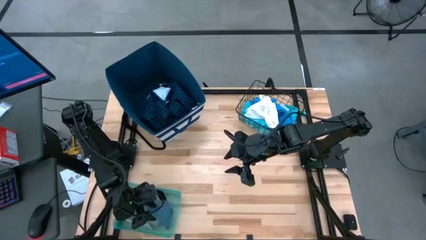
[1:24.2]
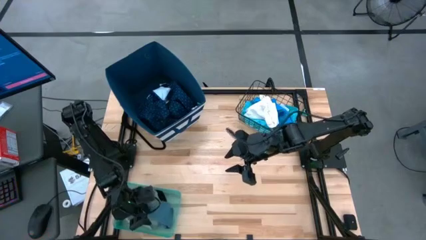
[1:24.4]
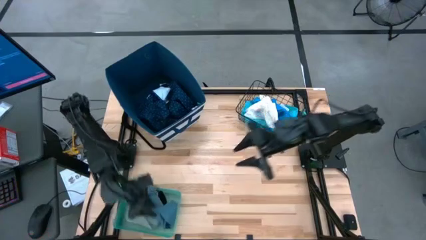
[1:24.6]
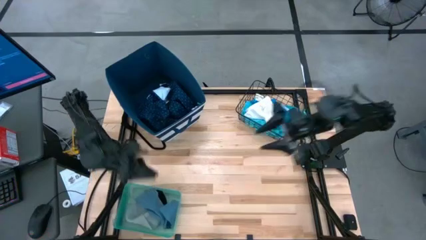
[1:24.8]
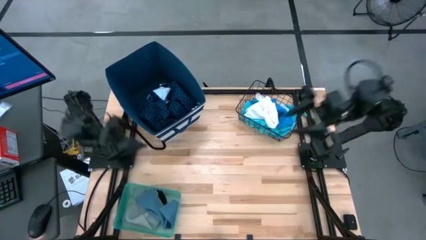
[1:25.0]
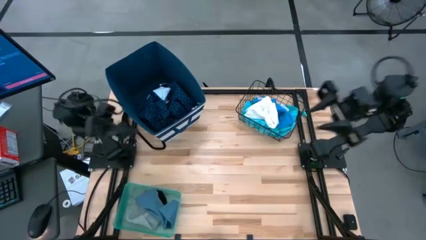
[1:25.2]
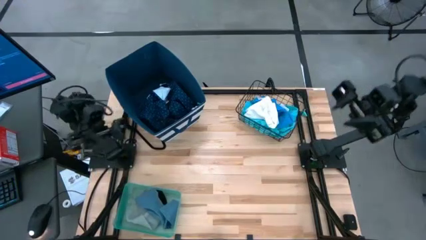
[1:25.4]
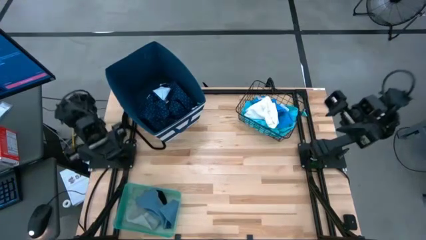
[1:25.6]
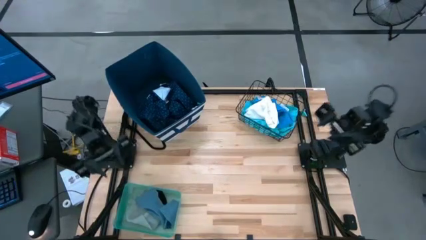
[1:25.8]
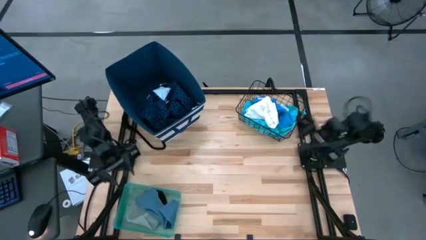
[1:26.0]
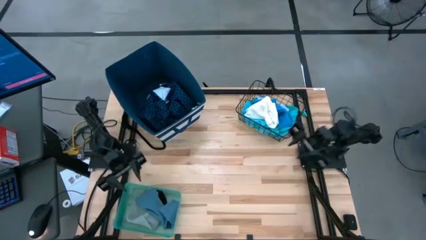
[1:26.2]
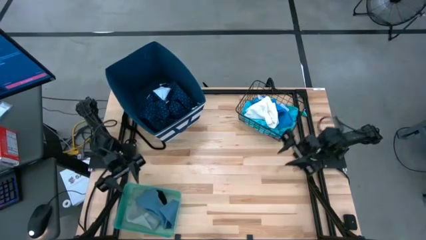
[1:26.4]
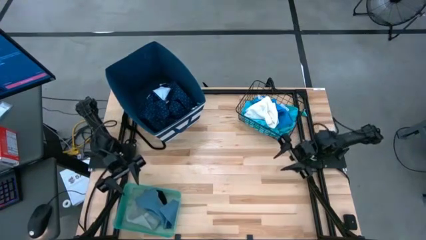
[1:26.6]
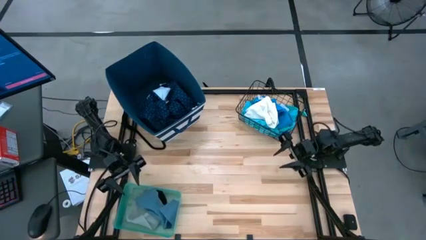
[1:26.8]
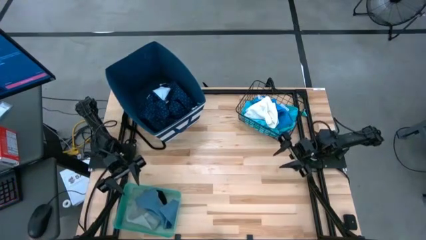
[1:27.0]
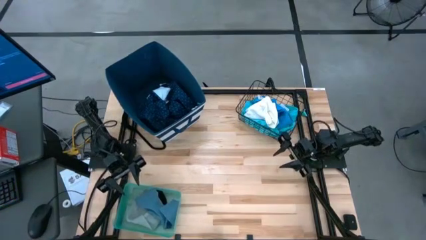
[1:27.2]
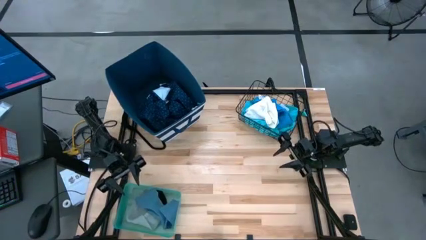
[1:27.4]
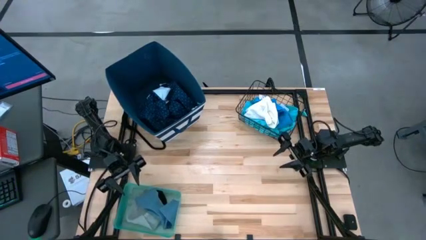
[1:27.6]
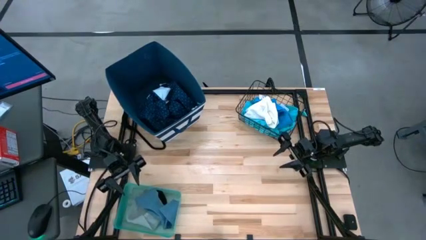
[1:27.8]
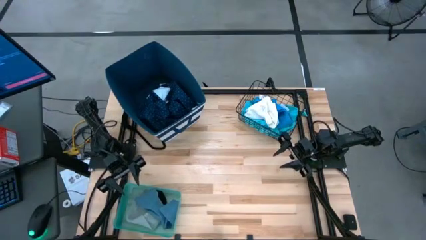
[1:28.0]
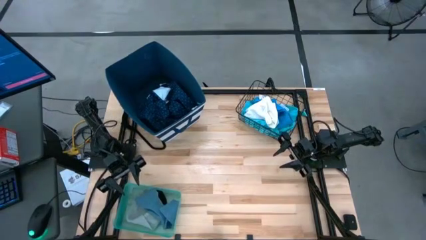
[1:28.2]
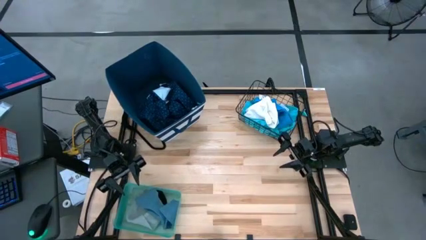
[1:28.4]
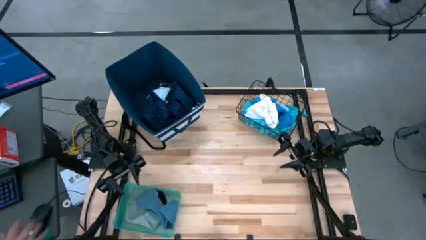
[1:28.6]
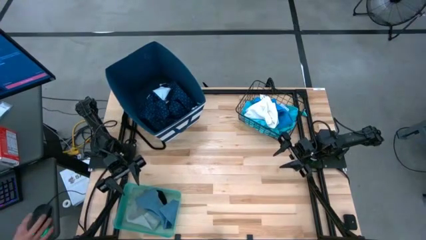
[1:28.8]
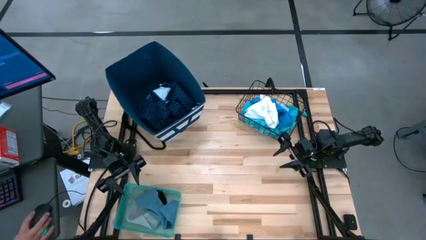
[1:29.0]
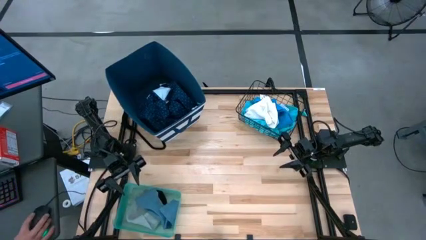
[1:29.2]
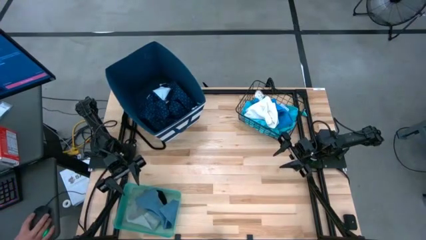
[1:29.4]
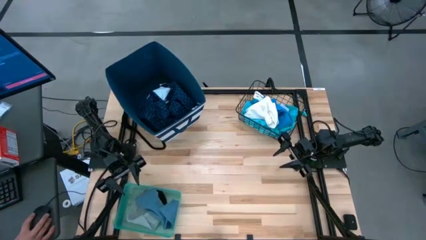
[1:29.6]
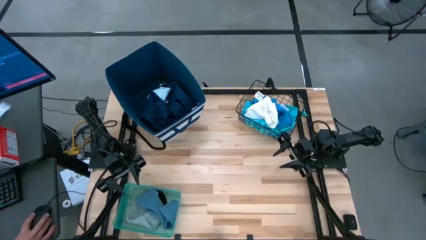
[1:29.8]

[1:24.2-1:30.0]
Task: Pick & Place Cloths
Return to Home Position

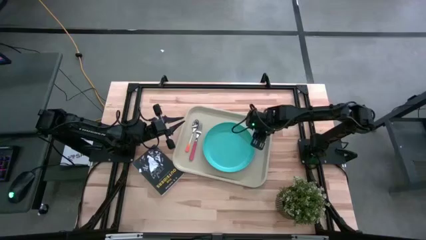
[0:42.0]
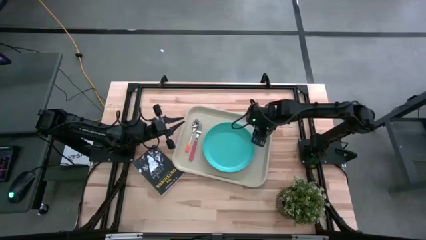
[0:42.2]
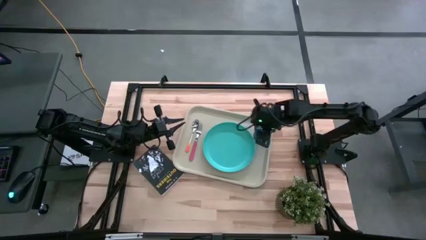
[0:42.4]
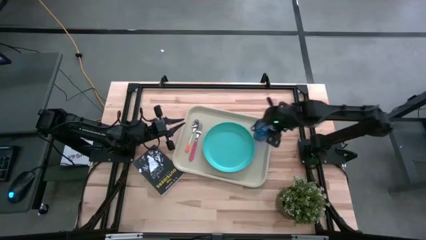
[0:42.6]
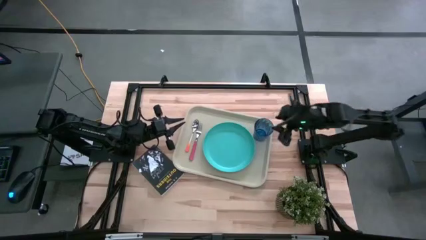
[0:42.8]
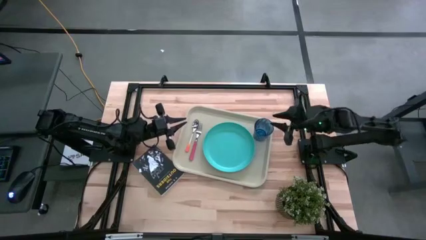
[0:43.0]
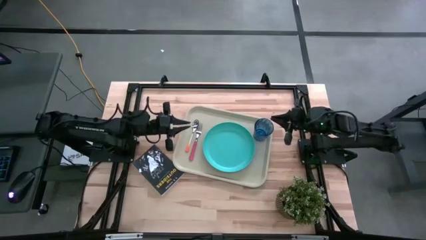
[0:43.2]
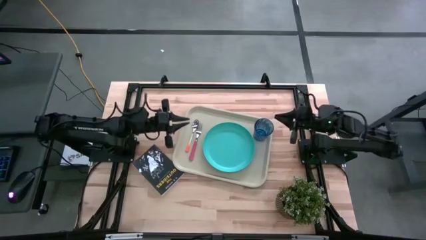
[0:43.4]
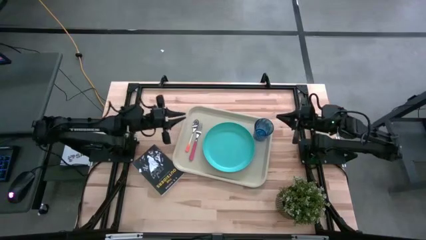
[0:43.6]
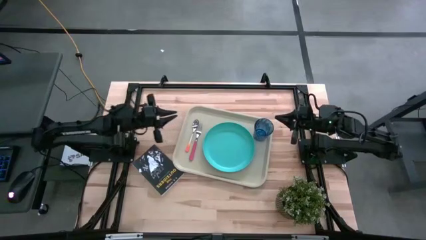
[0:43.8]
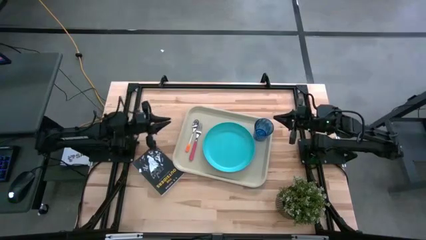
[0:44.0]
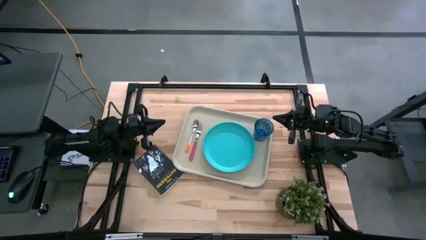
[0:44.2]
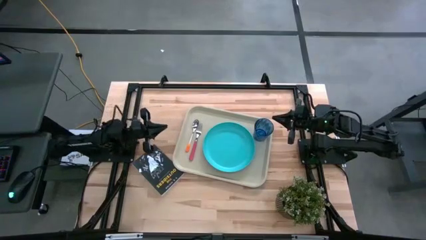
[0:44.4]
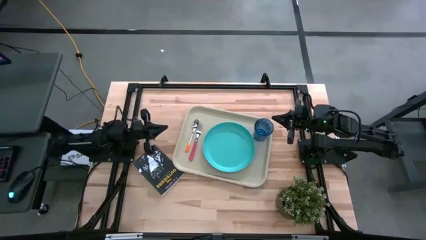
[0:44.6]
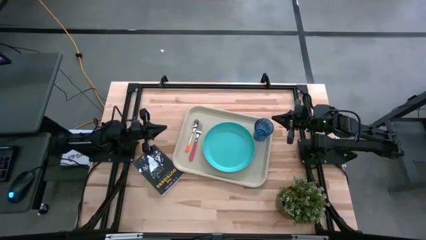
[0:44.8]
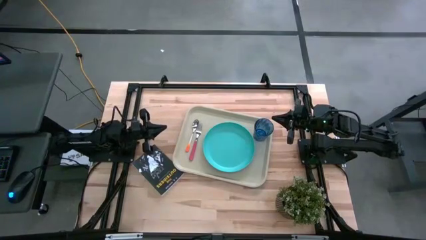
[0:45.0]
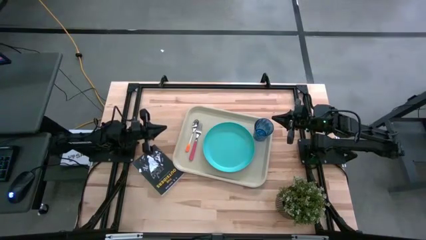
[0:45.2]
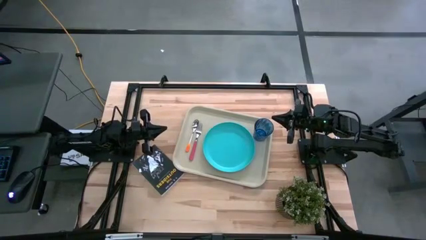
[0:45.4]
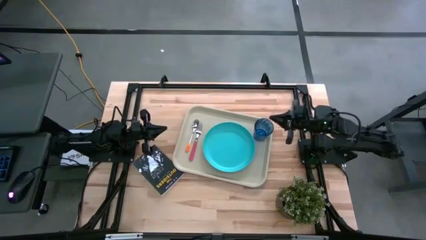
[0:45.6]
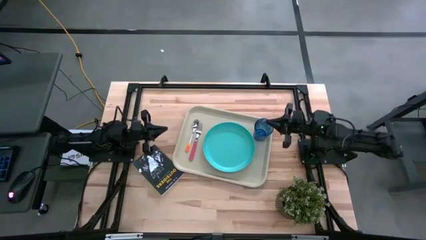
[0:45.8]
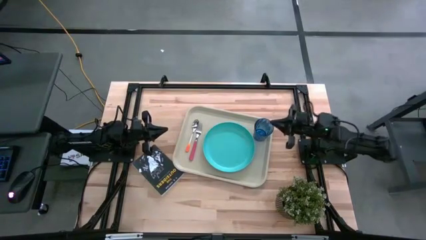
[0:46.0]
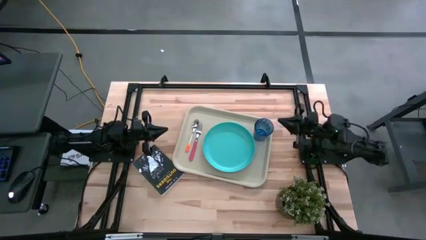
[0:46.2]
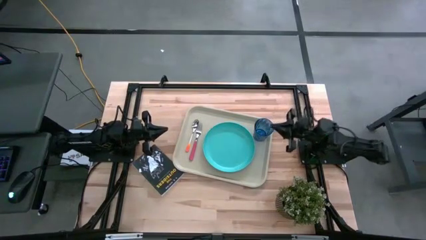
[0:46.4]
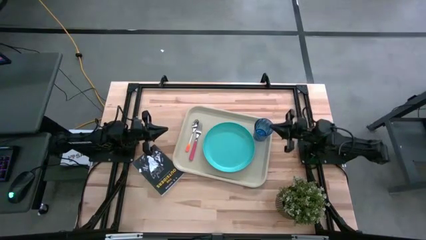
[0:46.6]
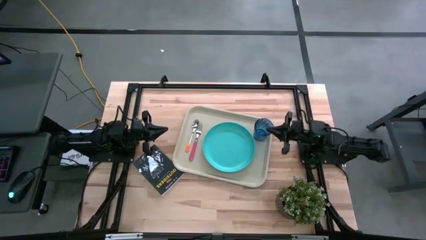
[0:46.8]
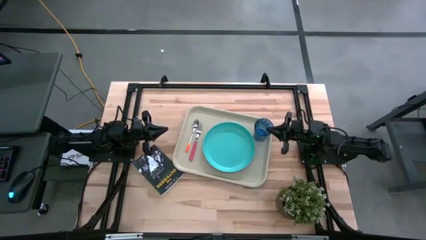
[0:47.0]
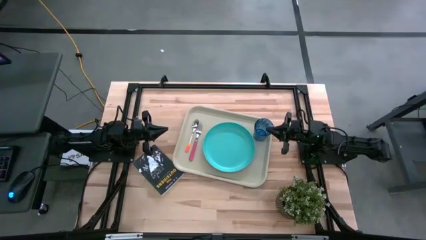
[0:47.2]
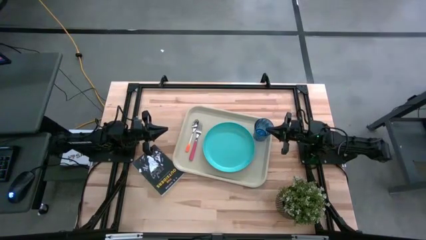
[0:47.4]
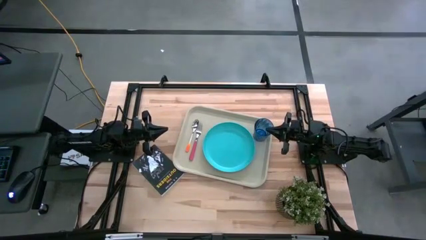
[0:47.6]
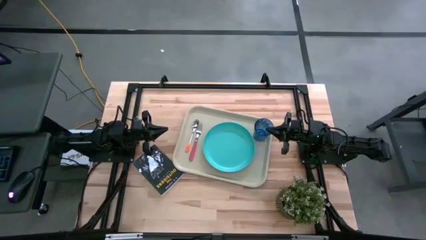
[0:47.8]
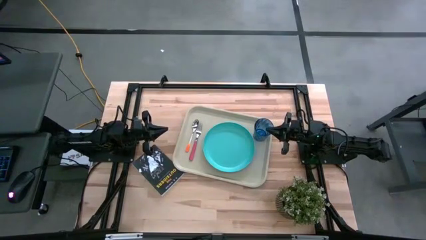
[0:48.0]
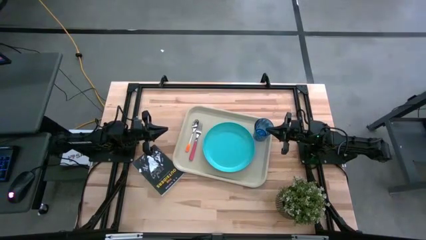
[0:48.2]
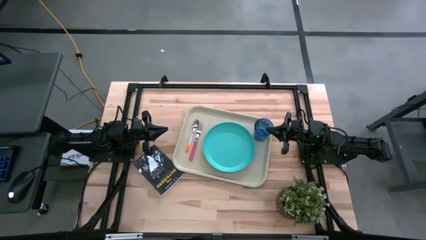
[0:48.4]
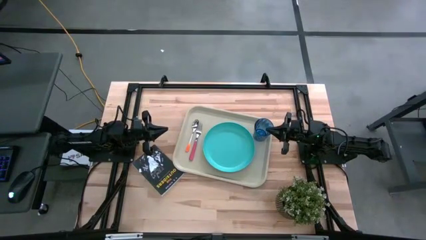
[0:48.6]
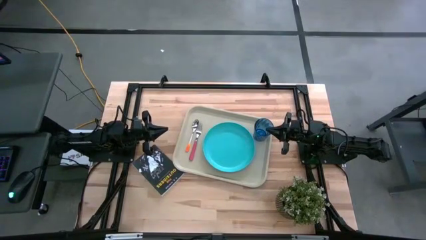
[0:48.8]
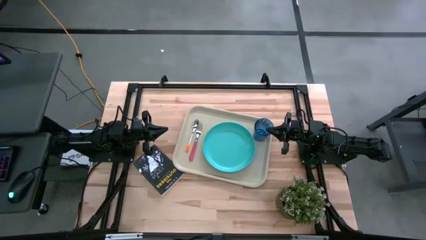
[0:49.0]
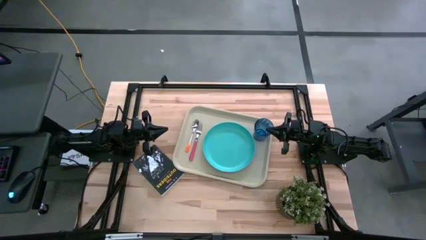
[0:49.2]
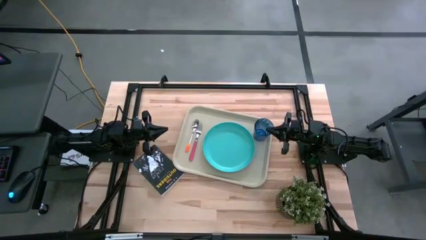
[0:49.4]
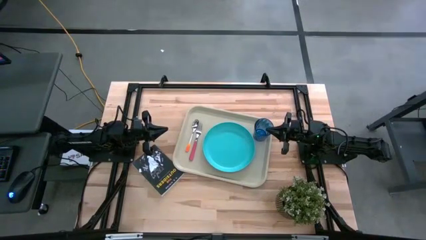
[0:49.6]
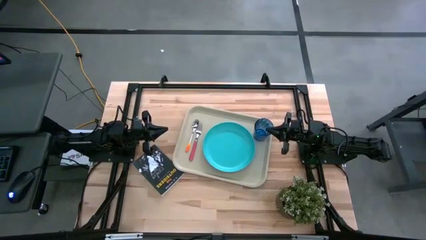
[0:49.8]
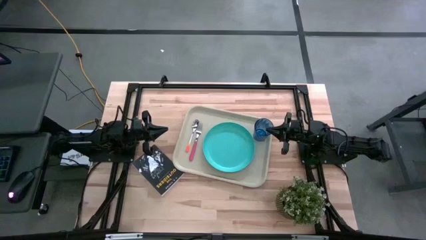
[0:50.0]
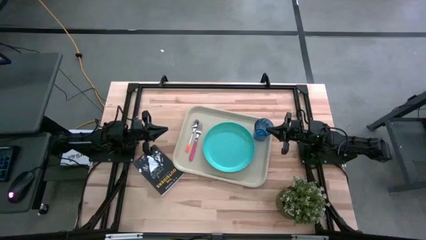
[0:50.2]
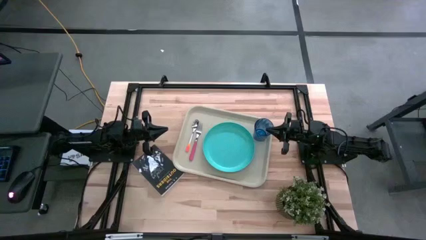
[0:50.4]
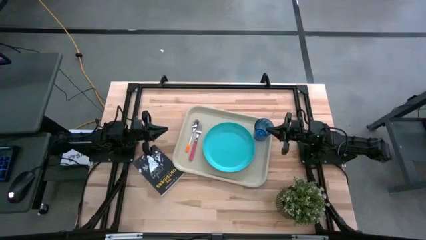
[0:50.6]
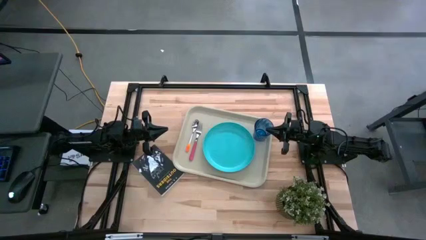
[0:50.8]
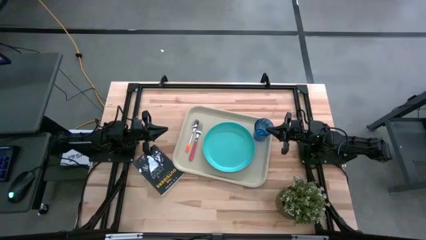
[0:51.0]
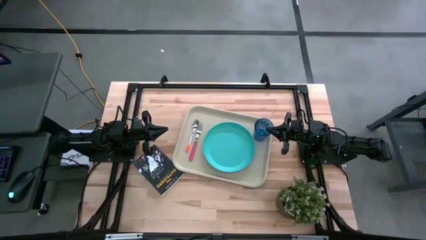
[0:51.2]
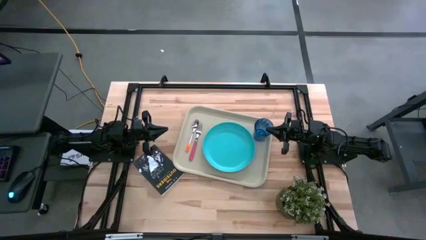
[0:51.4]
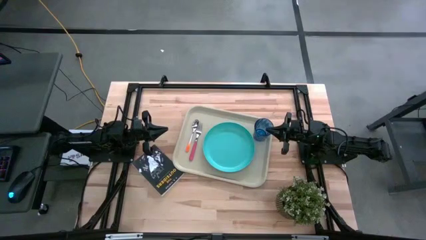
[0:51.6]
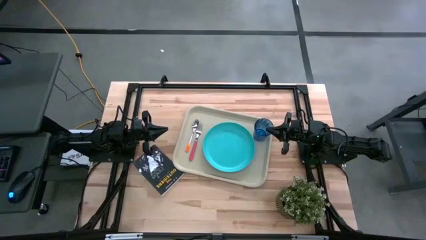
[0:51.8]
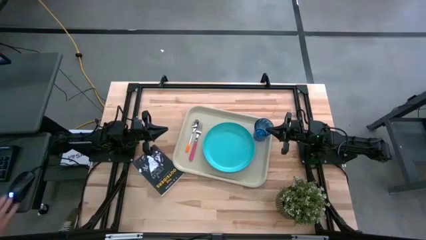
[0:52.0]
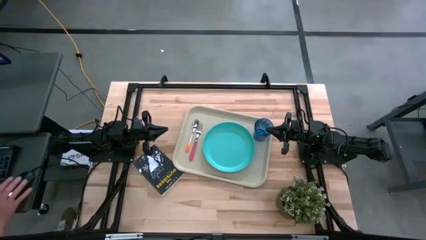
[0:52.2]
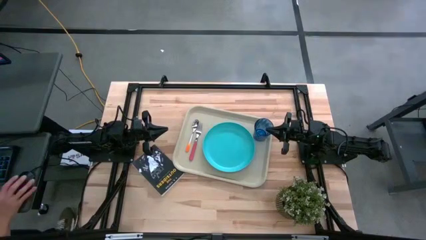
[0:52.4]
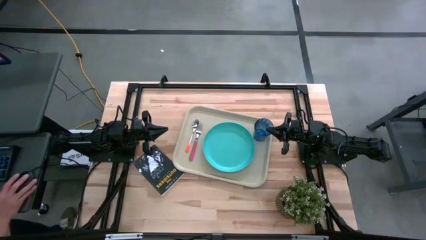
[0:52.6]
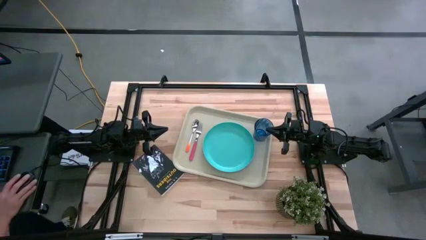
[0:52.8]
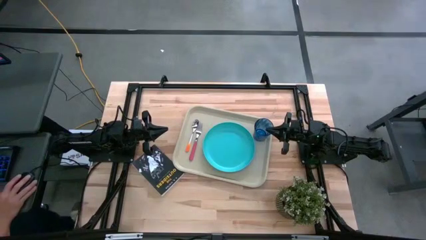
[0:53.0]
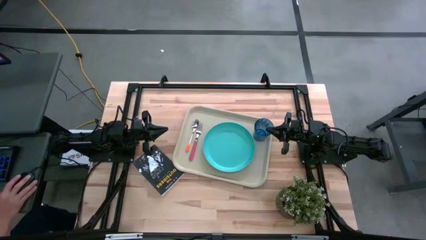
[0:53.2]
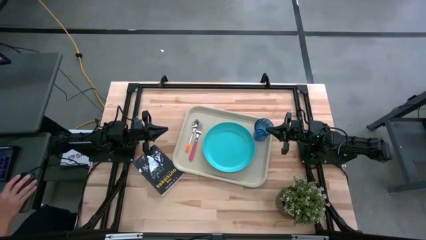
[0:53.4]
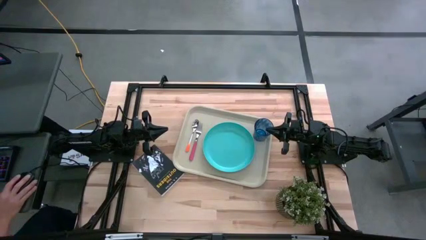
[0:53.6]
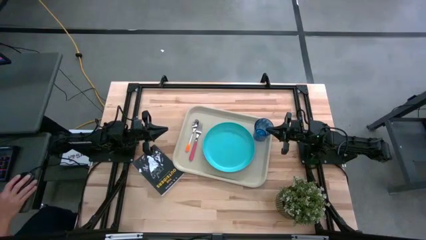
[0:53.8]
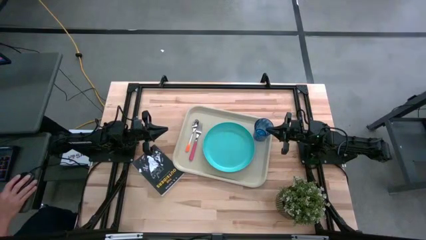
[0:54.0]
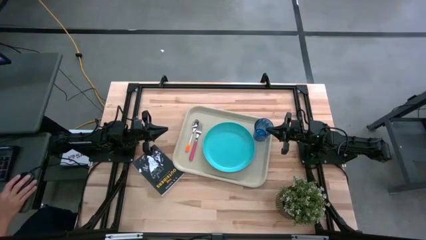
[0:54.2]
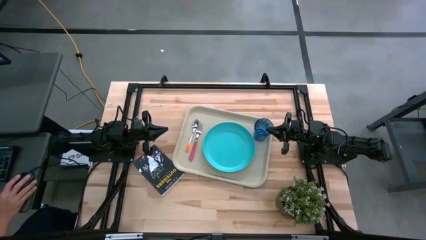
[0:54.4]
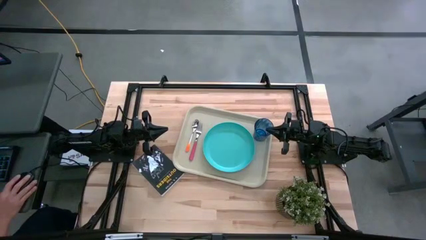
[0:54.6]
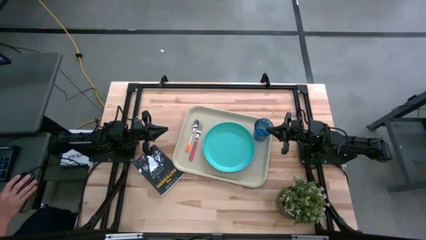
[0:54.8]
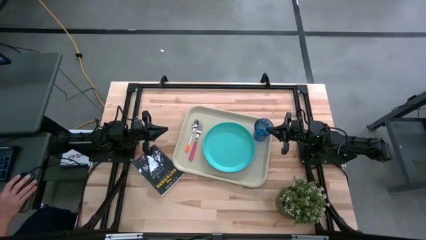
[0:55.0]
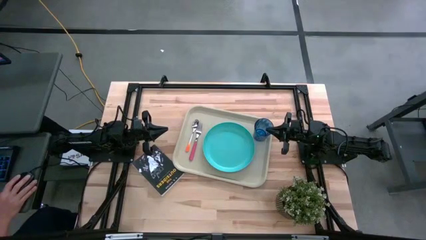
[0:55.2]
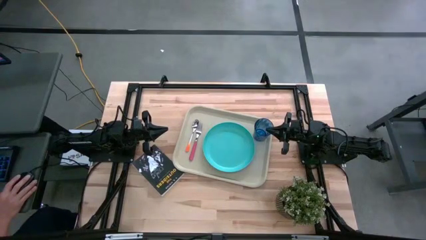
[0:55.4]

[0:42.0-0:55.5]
Task: Pick and place plate/cup/fork/spoon on tray
Return to Home Position
